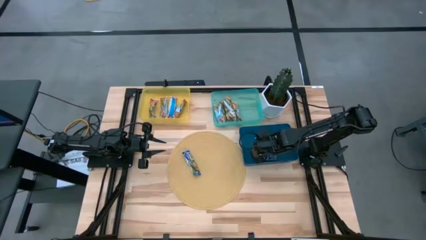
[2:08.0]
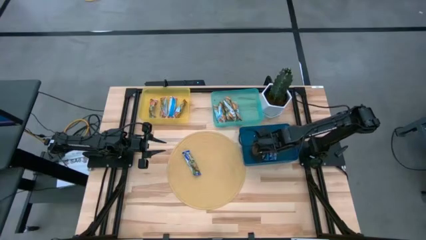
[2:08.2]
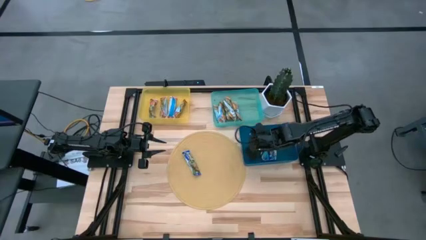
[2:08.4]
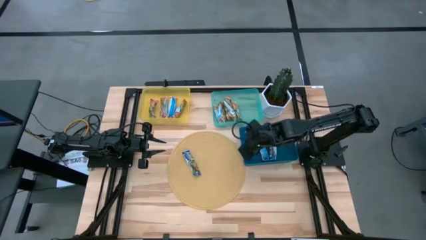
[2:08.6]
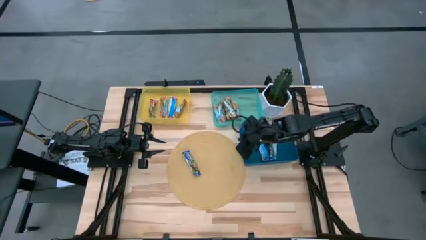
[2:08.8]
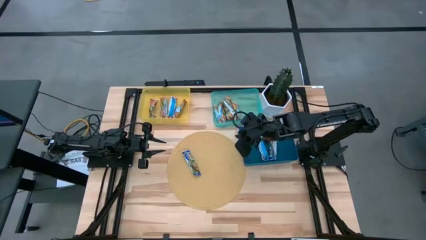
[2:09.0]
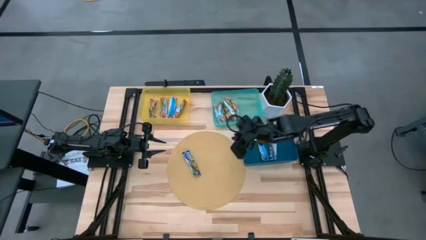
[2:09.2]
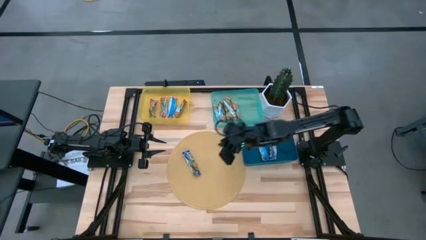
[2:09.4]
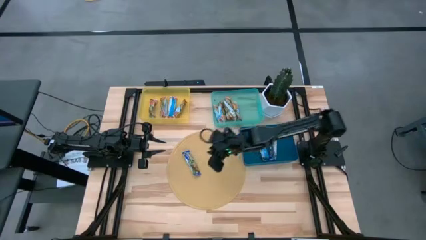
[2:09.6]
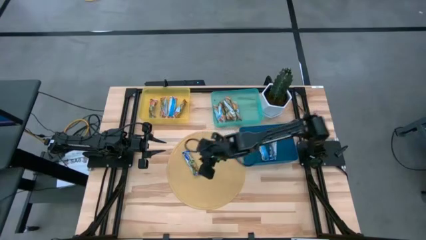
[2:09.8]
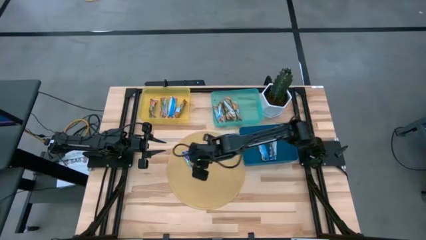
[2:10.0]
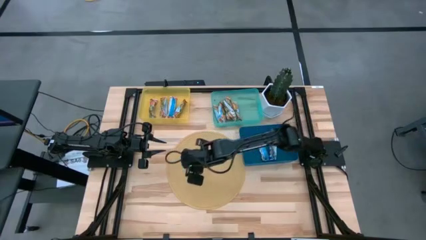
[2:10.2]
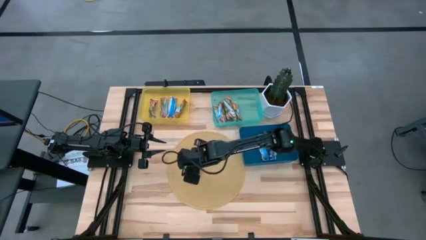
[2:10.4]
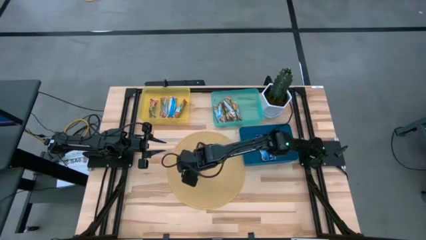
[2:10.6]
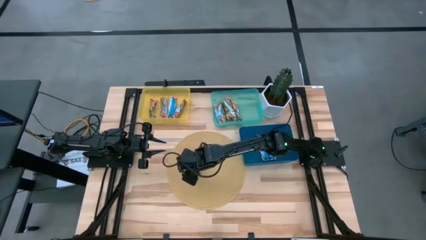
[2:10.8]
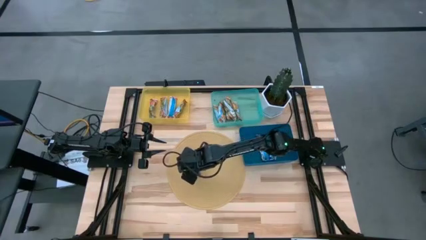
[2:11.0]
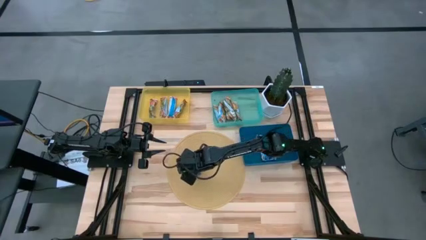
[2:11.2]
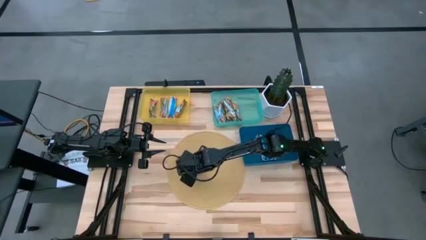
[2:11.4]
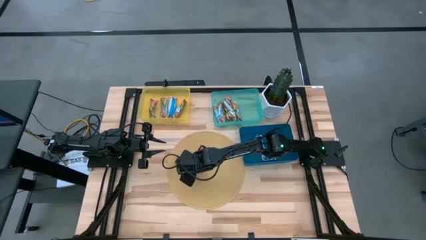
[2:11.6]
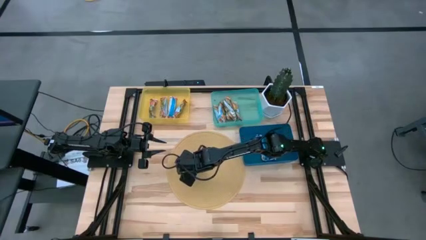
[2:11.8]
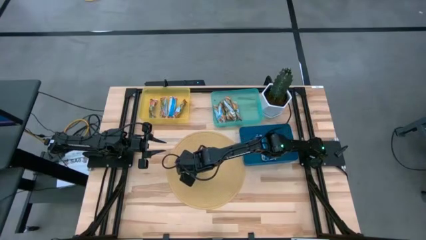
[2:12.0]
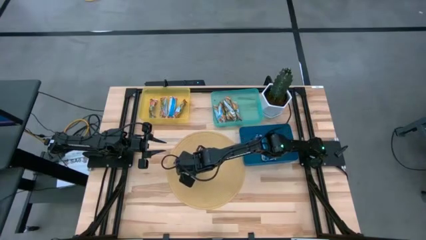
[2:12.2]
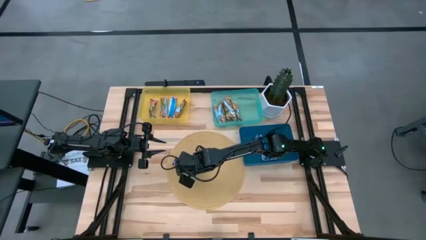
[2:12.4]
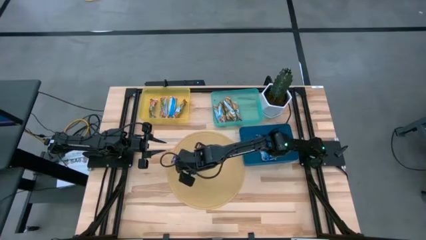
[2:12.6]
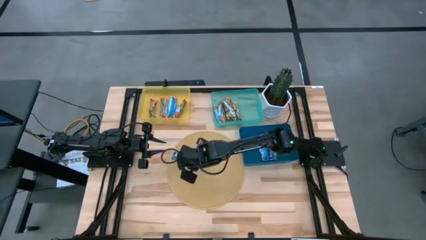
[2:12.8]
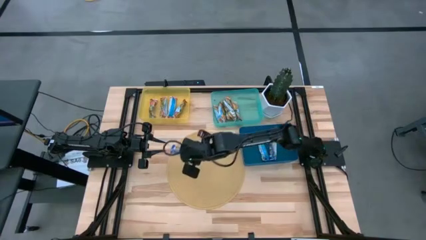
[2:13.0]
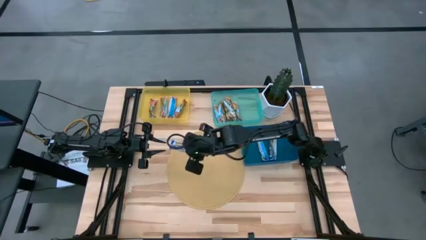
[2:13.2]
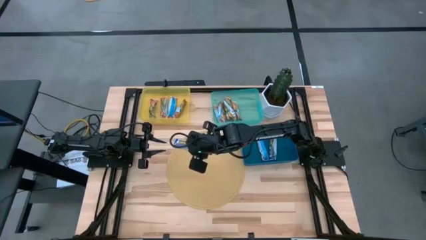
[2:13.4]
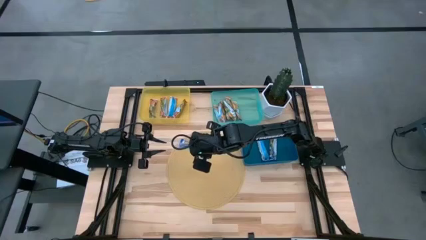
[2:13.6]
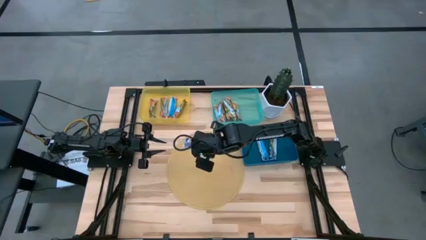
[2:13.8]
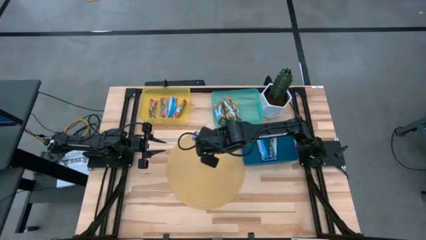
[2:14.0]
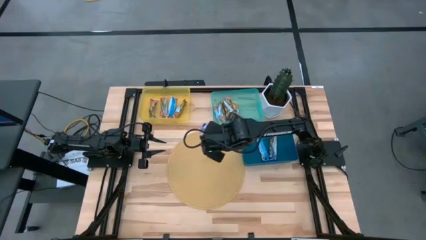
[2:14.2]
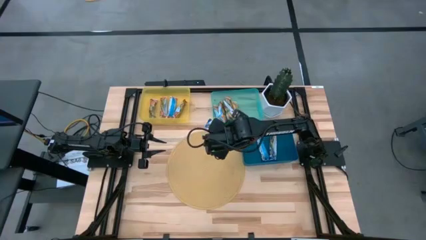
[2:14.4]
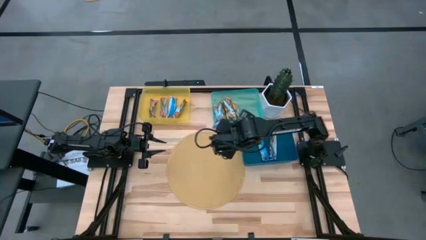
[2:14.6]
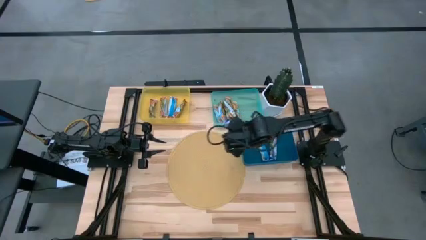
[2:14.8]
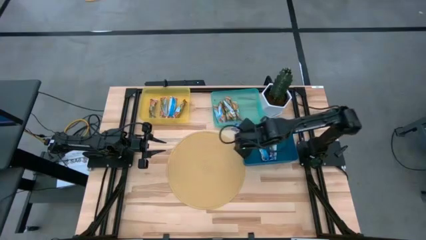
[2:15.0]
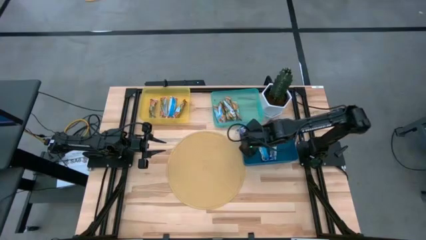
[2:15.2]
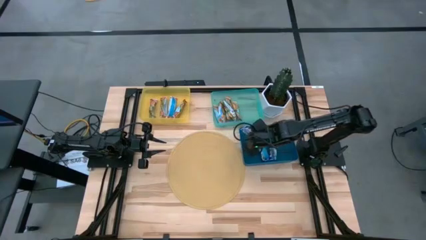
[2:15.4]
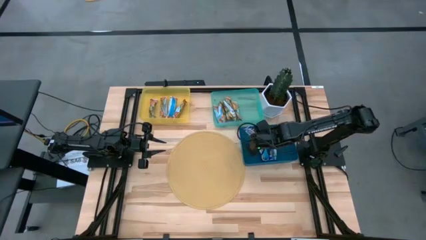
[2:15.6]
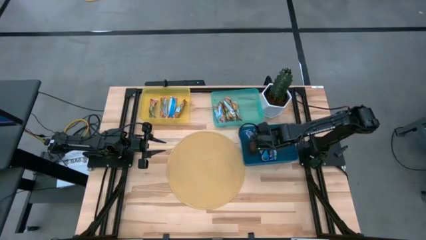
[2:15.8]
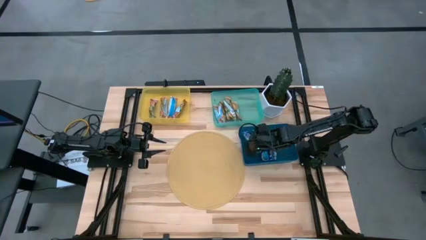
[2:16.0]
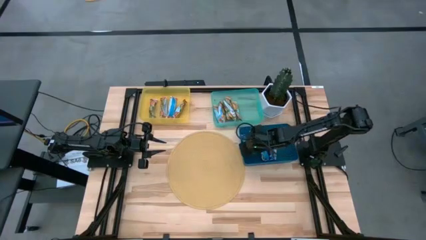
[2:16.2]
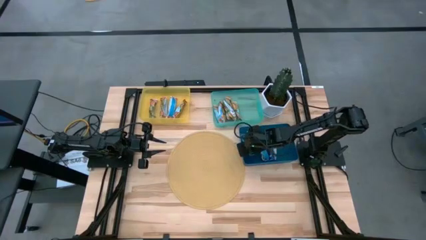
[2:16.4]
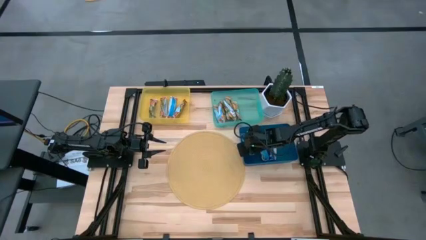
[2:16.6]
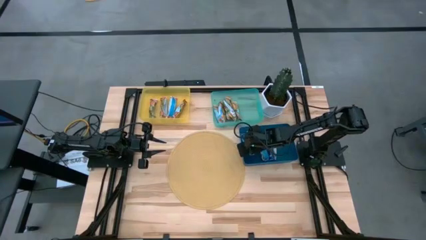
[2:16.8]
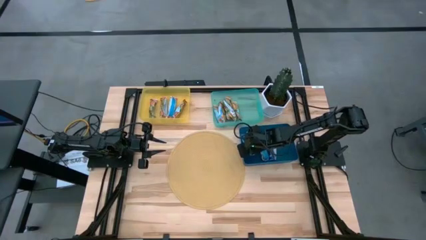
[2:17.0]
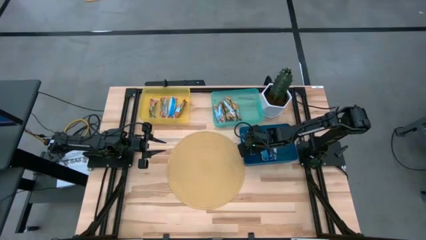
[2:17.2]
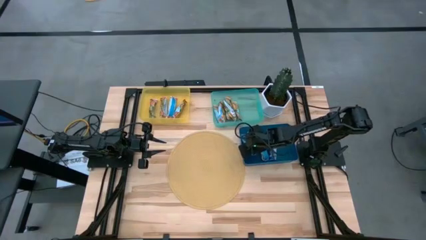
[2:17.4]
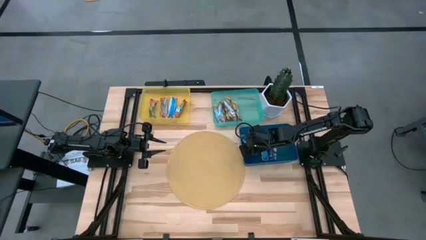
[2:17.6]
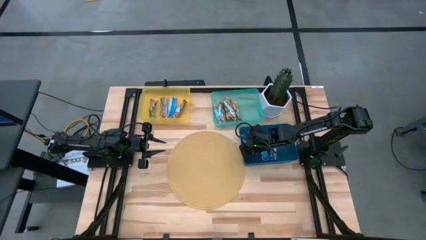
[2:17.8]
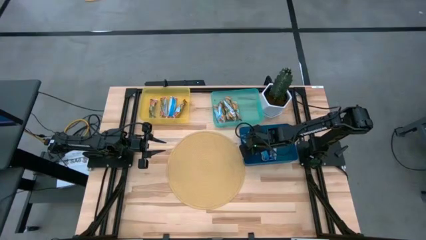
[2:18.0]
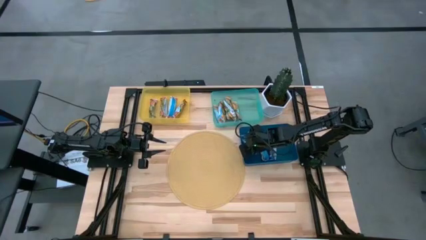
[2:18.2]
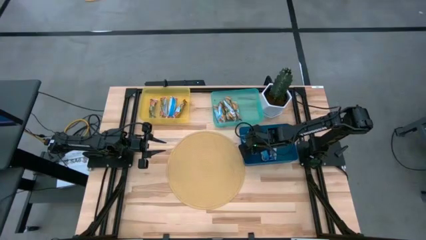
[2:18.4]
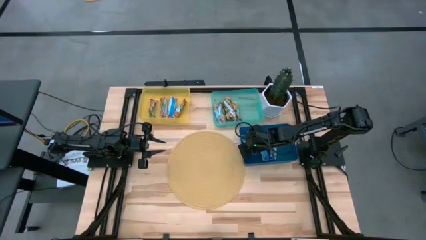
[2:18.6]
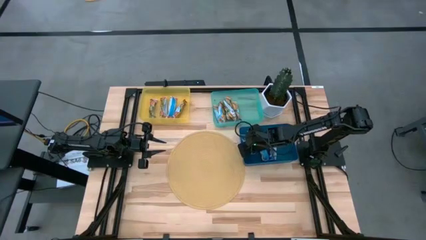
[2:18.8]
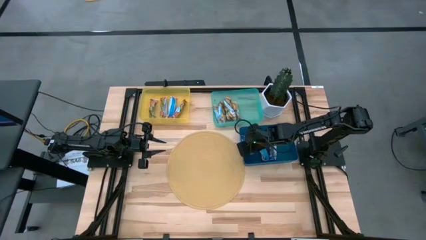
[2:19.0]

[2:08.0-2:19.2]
Task: Pick and place Granola Bars by type
Put the blue granola bar into the blue bin

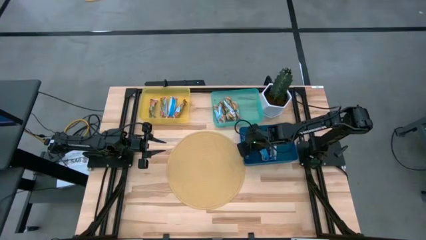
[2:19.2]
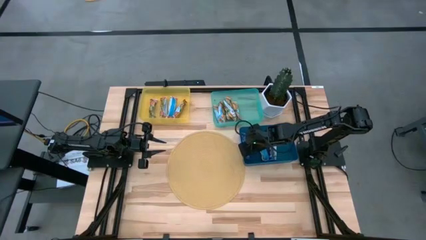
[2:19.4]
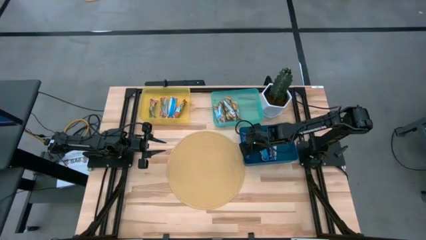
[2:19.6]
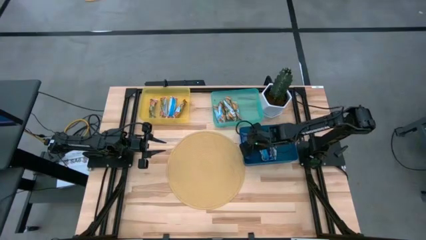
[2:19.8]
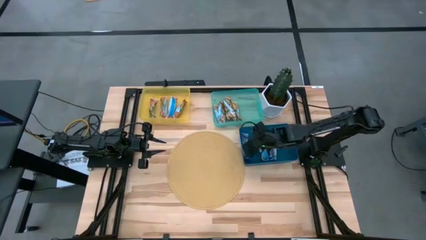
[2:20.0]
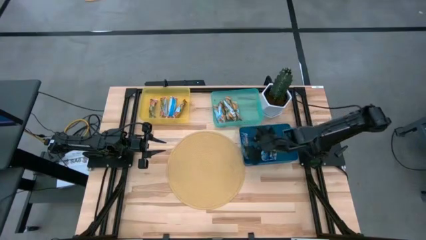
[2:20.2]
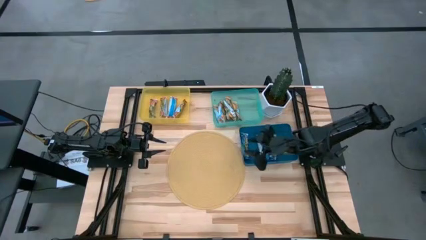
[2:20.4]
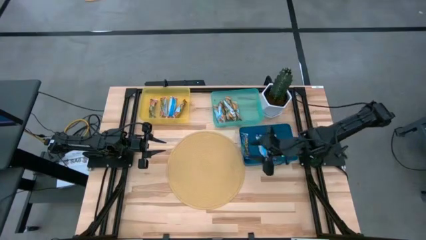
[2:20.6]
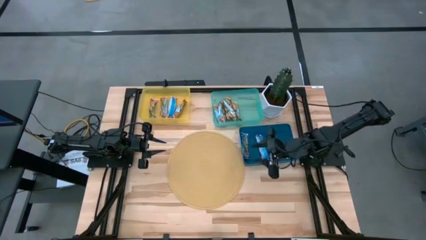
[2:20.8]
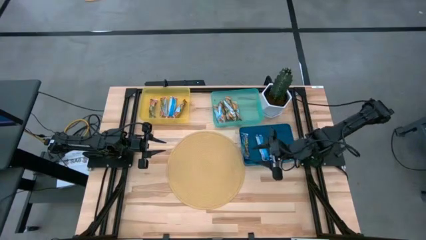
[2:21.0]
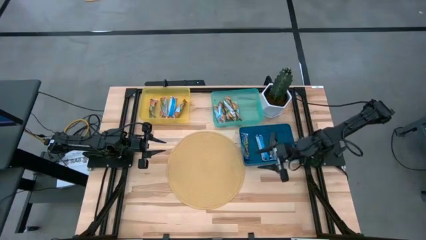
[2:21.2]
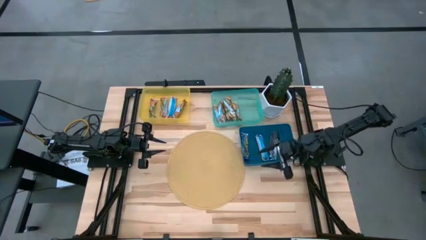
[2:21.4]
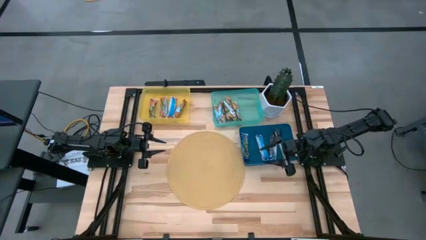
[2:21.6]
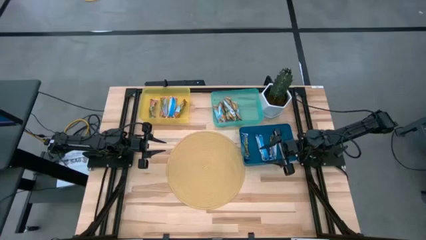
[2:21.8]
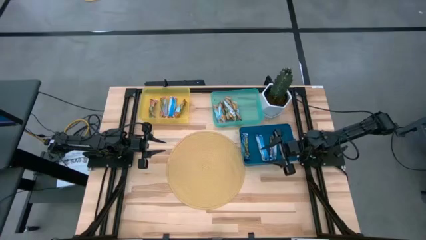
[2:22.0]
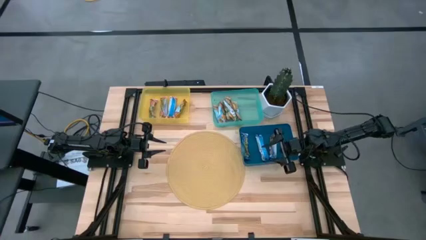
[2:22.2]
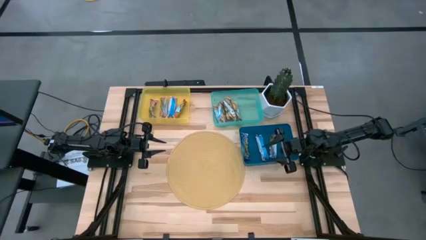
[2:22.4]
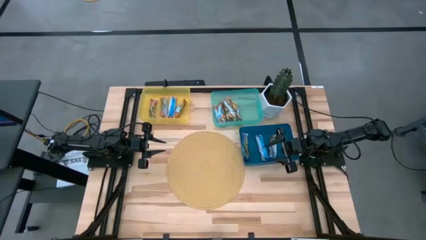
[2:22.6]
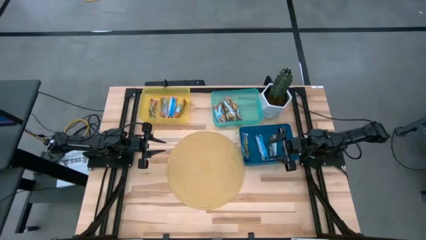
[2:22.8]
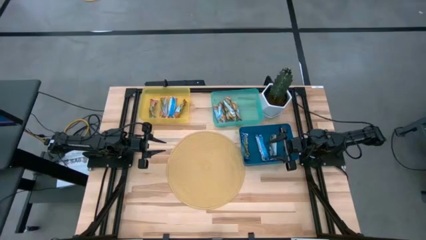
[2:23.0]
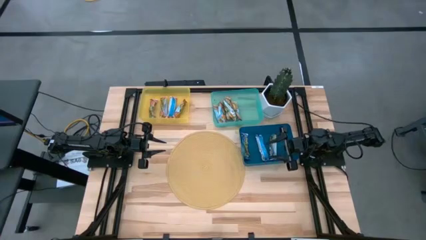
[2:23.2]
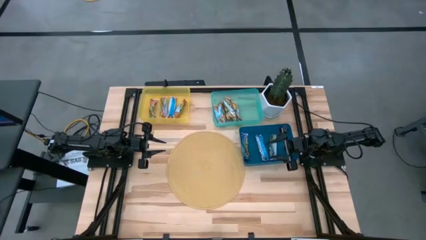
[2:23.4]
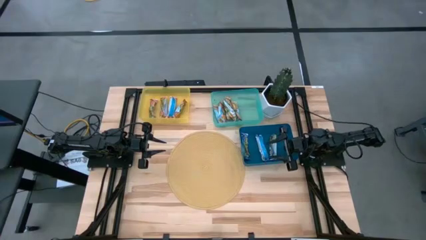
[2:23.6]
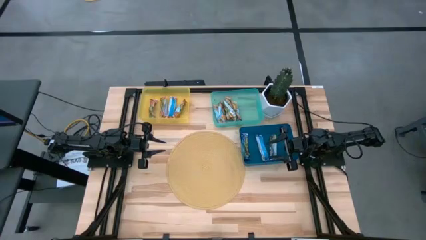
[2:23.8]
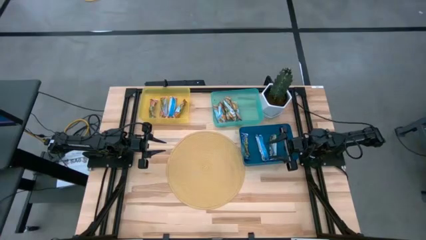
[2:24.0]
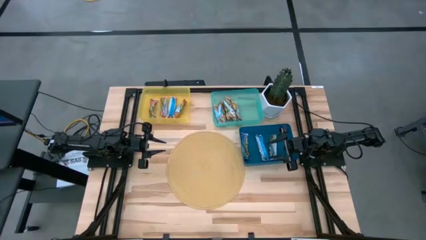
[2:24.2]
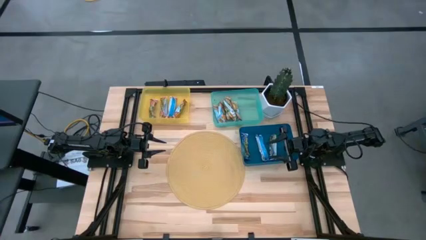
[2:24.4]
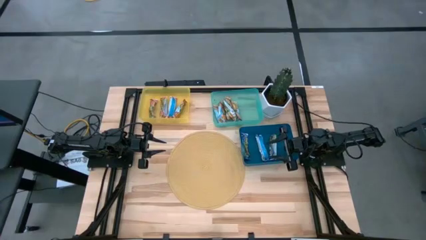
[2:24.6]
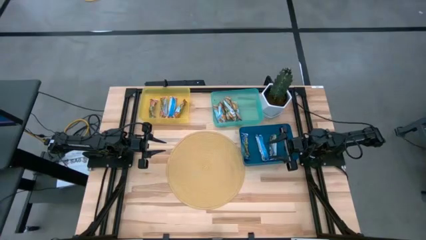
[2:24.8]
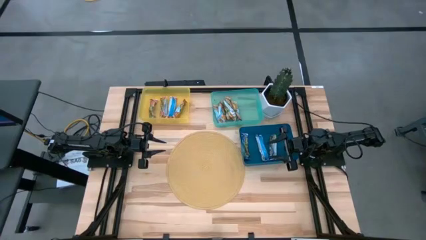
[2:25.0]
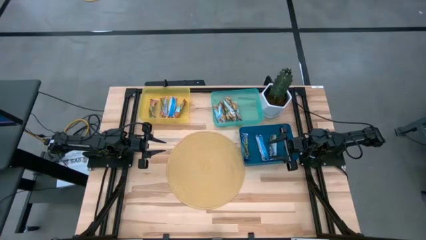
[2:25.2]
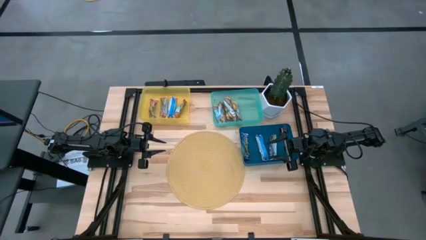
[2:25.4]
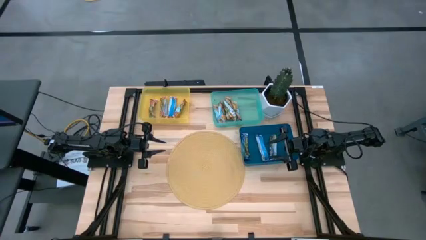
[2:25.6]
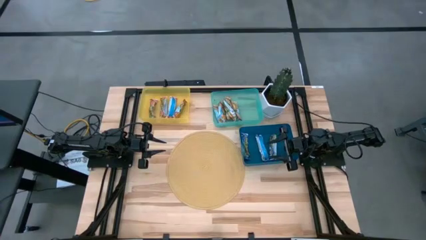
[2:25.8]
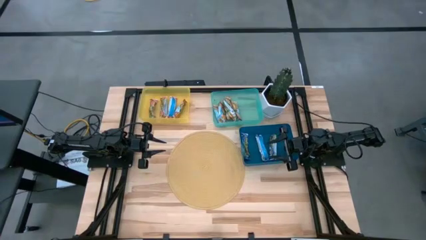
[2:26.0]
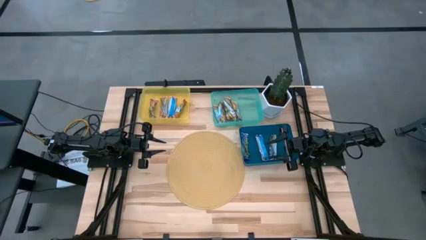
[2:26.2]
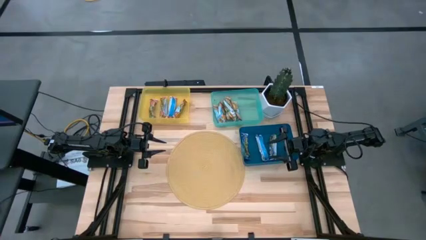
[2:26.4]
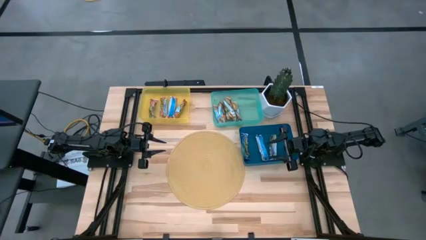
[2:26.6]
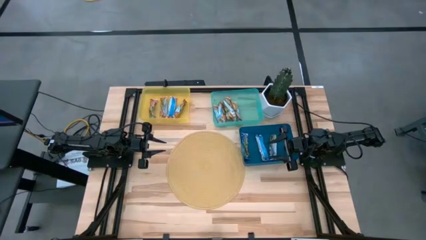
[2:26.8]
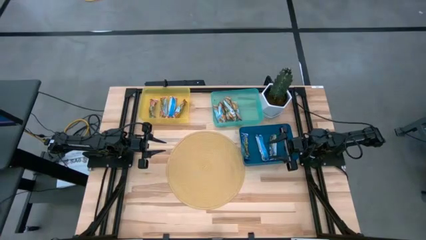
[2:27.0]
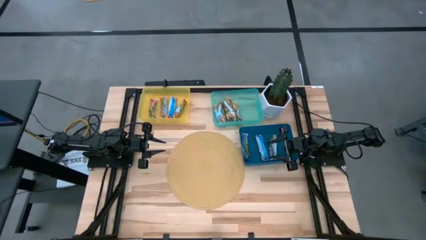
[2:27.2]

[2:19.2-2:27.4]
Return to Home Position
